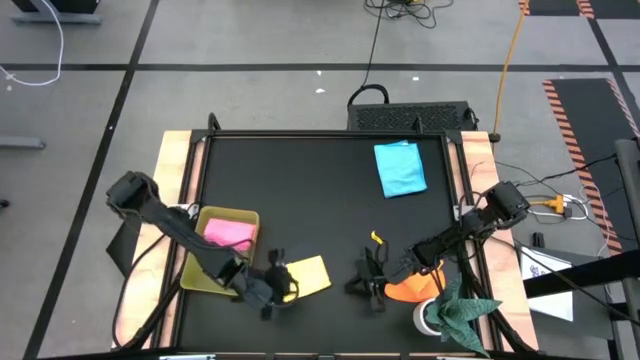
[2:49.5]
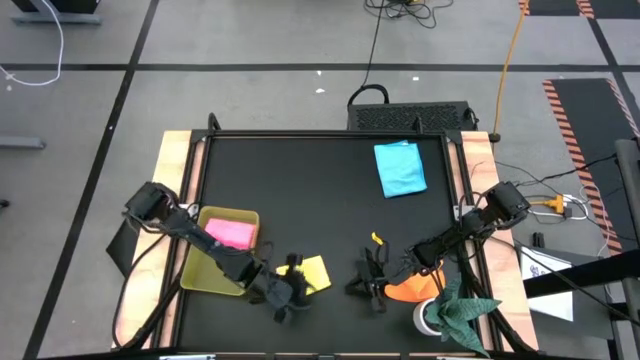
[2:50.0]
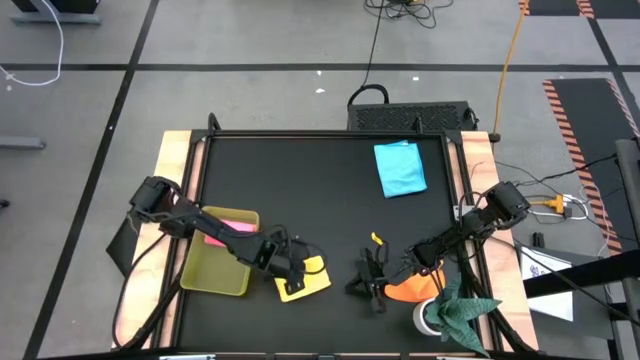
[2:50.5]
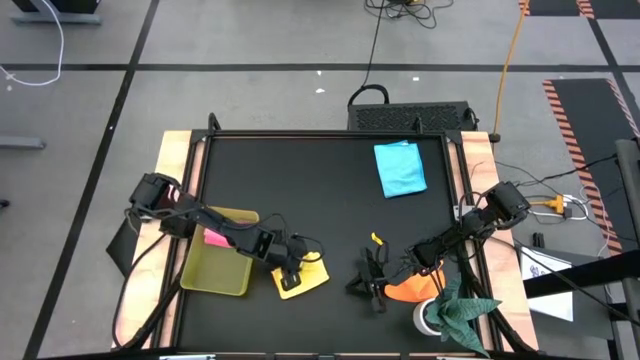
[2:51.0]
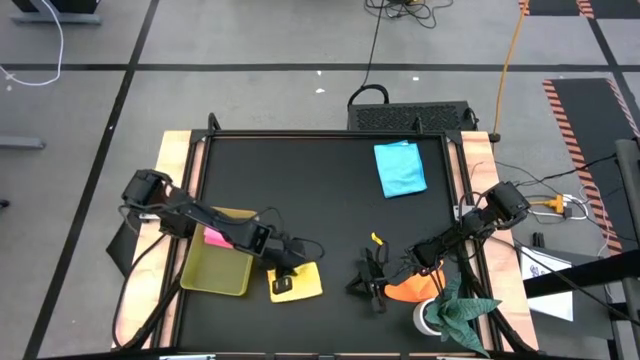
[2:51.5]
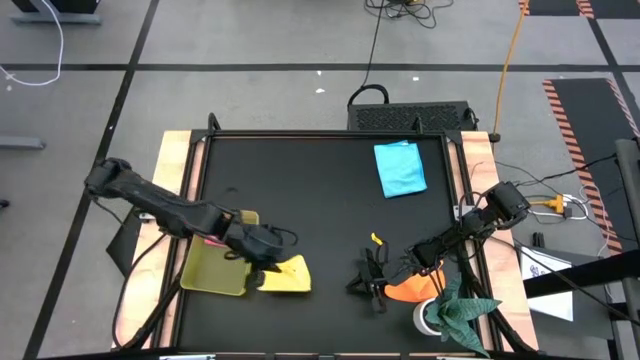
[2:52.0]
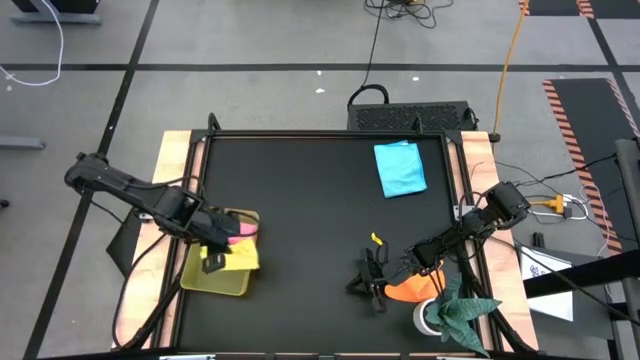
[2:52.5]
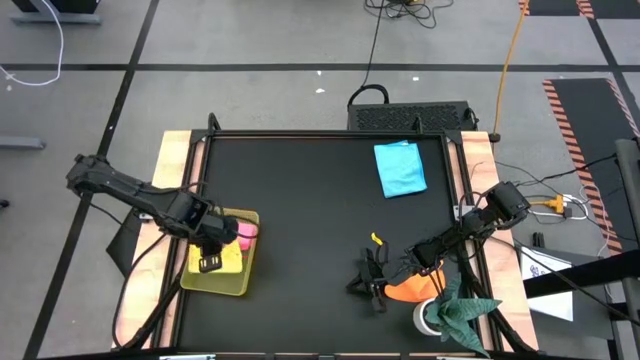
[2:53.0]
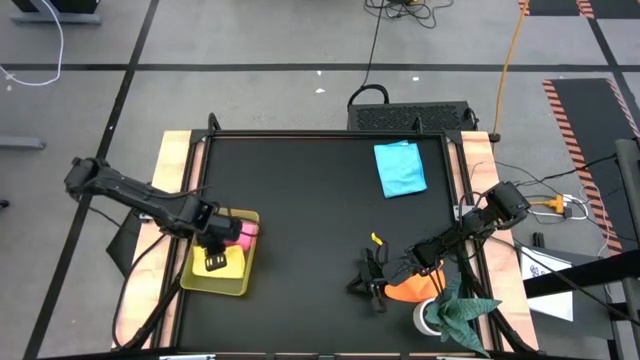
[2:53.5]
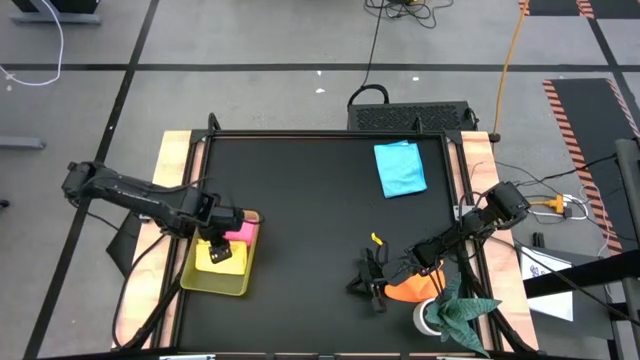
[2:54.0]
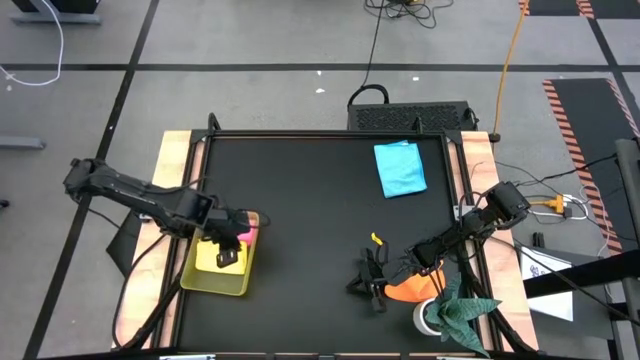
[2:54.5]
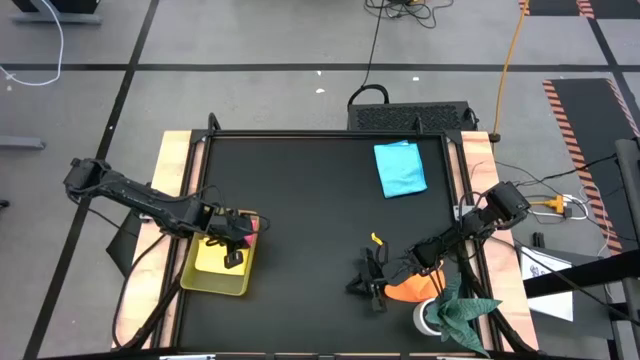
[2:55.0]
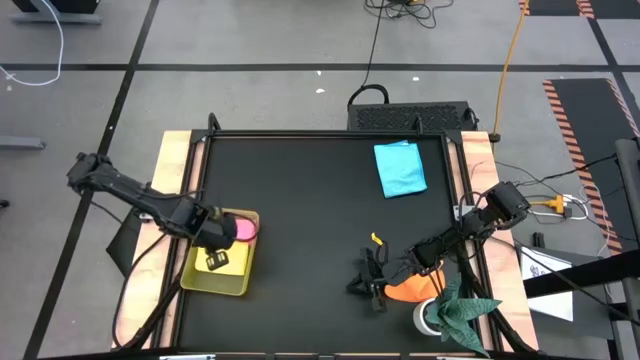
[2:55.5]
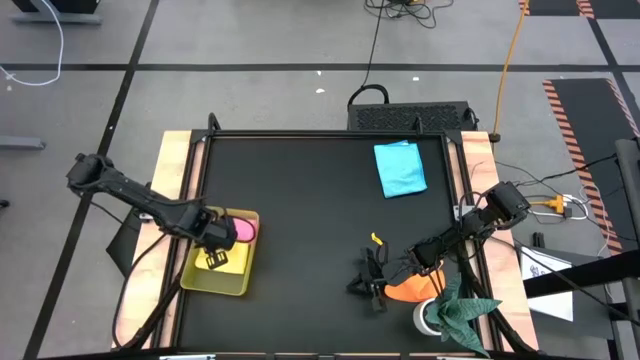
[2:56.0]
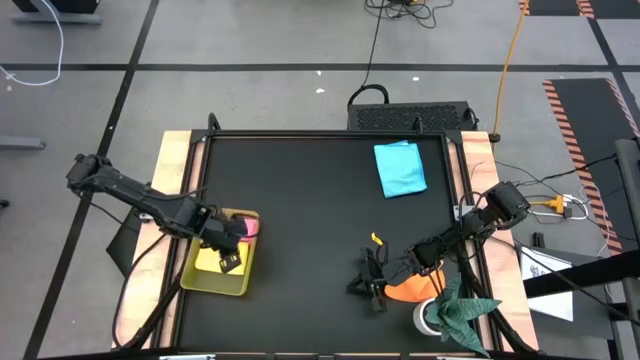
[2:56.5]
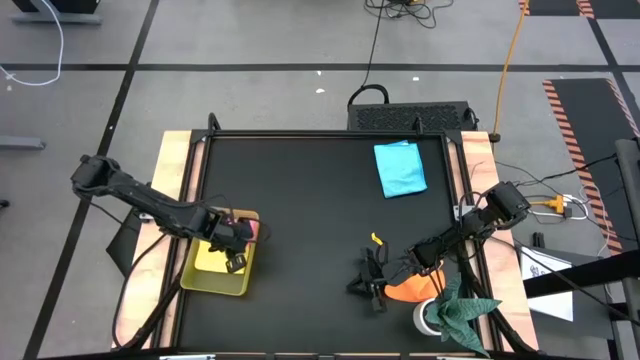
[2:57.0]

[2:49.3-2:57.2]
Task: Fold microfiber towels
Put the yellow microfiber towel into the yellow bin

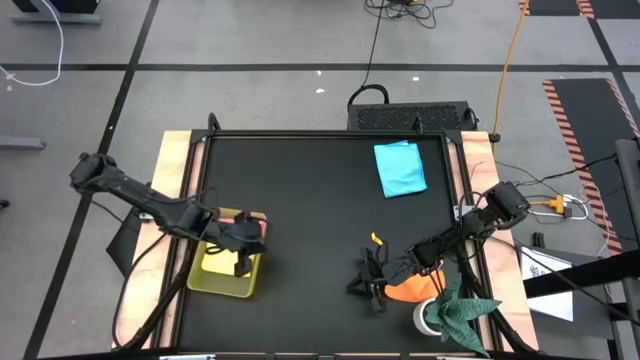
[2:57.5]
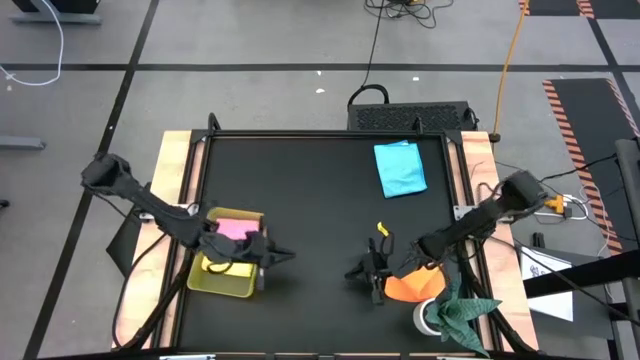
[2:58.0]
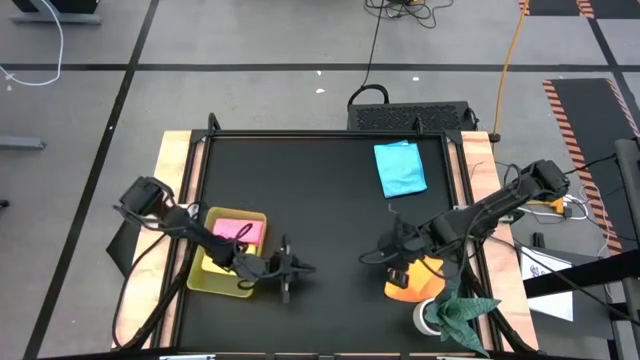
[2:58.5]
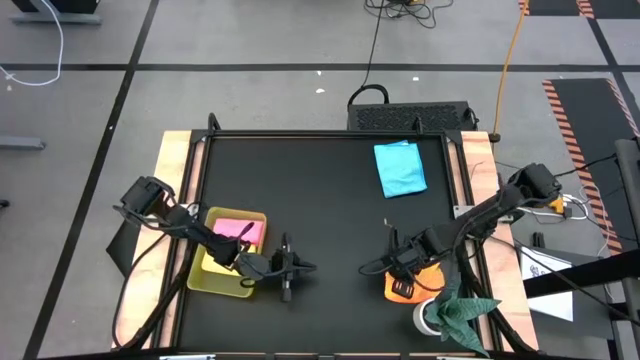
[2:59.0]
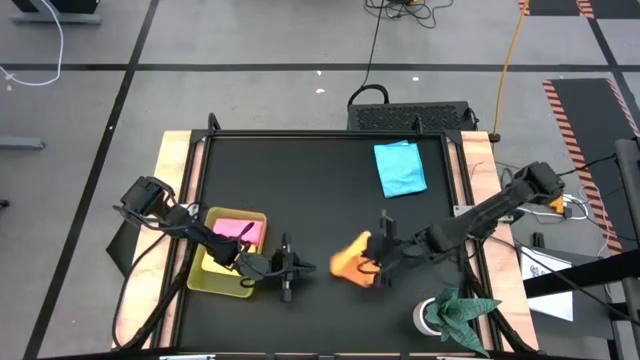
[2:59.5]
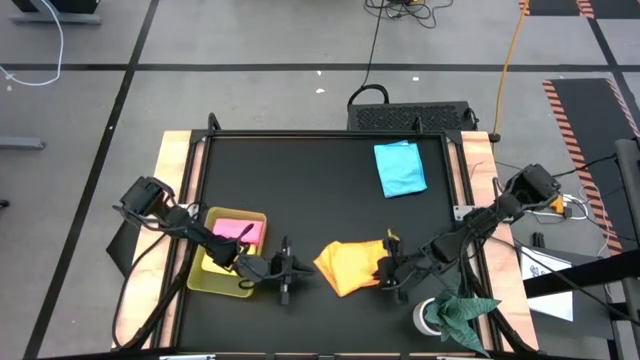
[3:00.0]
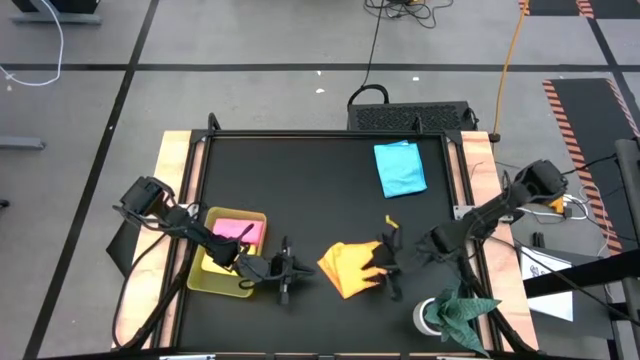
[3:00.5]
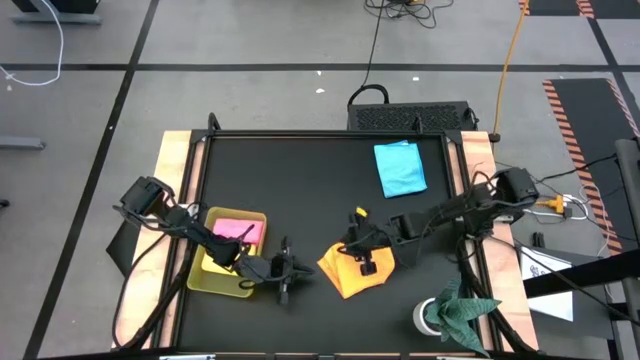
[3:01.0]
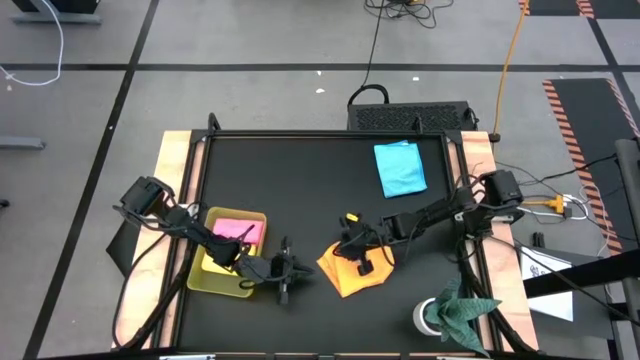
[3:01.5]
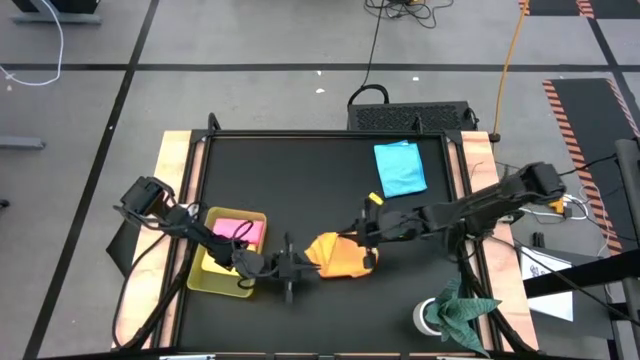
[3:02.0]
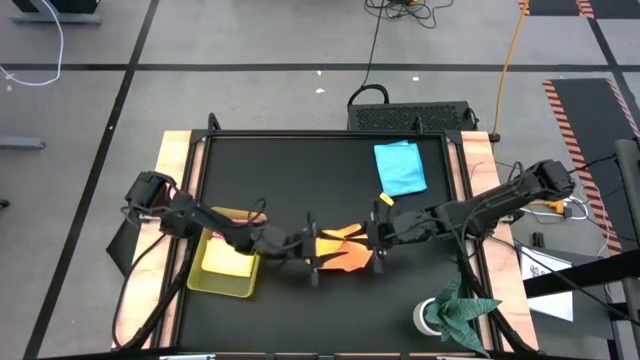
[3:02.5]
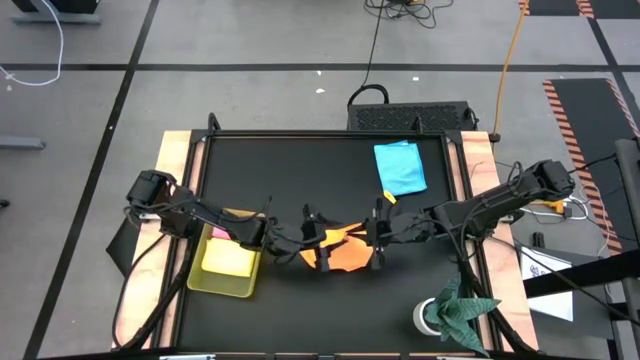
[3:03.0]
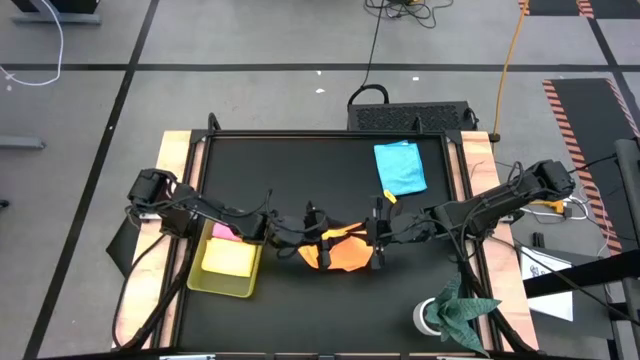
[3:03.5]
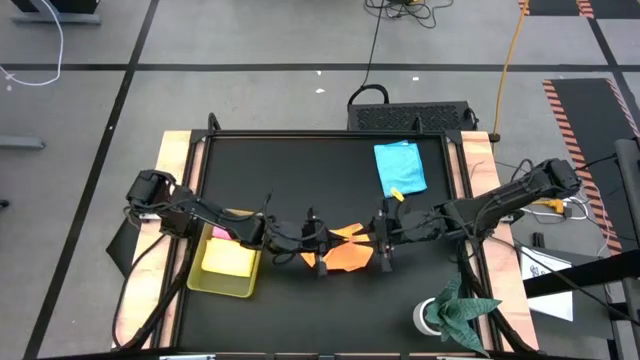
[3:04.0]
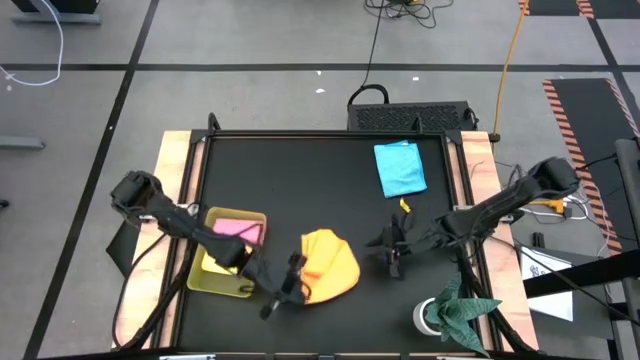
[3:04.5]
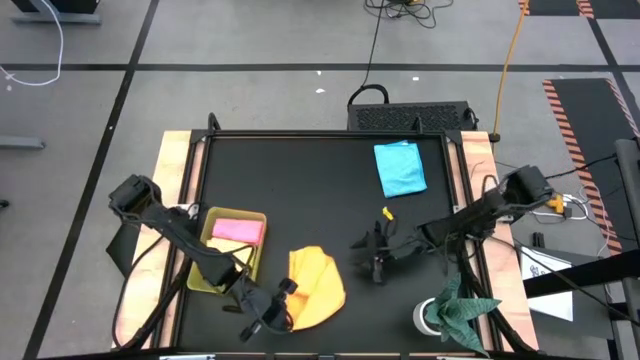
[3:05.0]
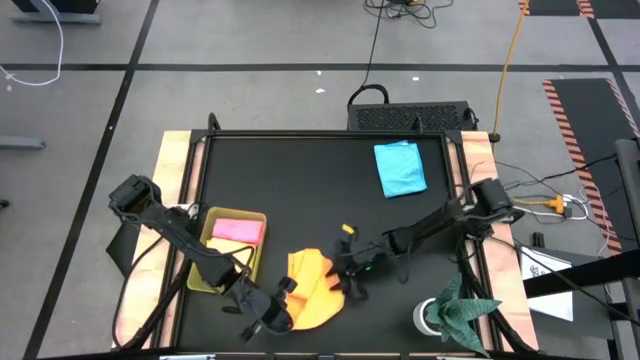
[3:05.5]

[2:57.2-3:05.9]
Fold the orange microfiber towel

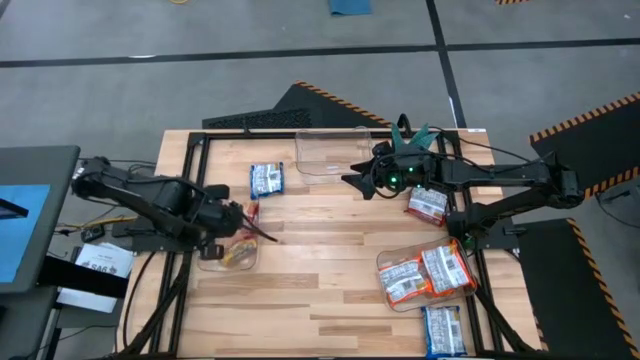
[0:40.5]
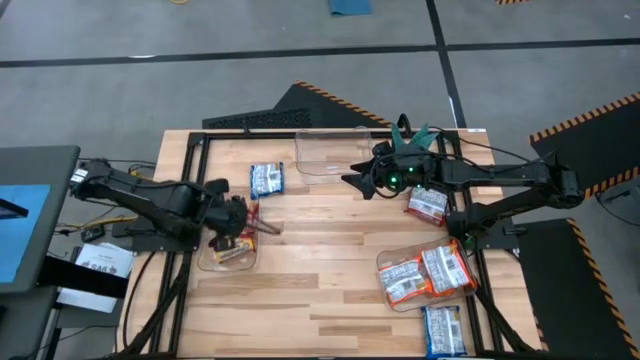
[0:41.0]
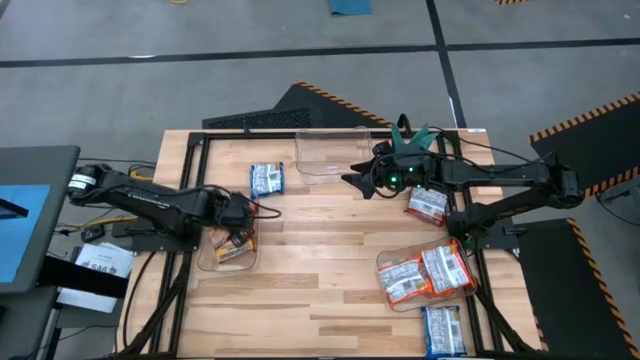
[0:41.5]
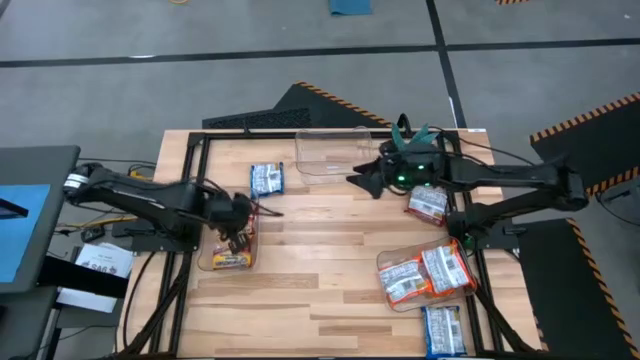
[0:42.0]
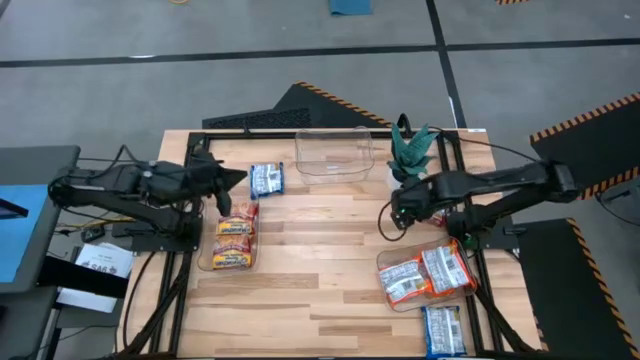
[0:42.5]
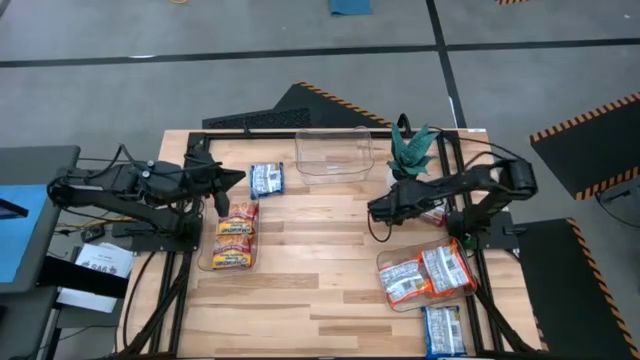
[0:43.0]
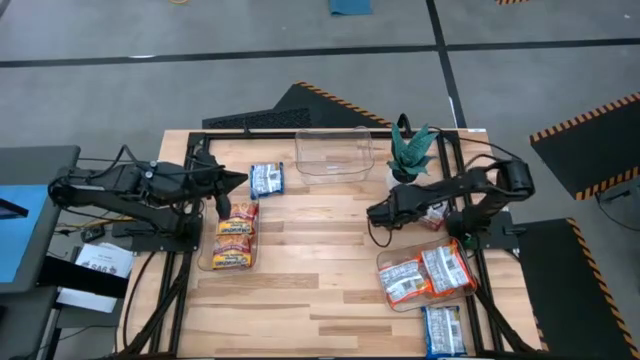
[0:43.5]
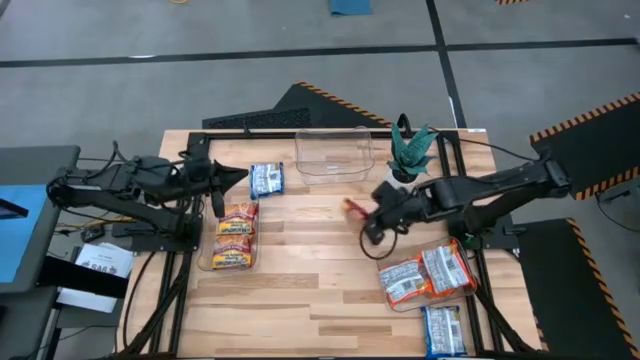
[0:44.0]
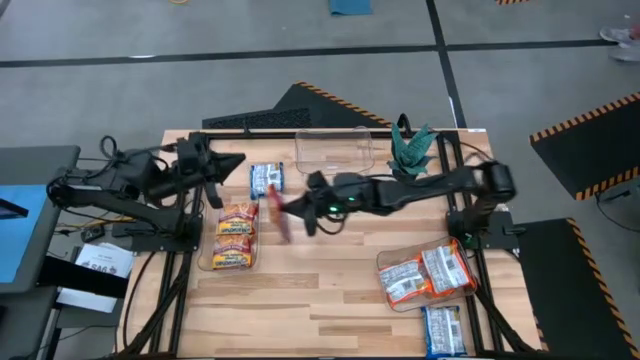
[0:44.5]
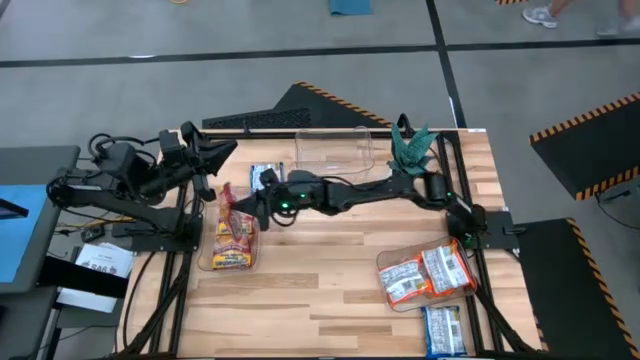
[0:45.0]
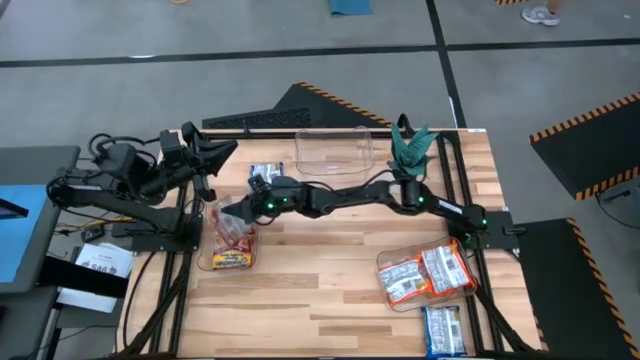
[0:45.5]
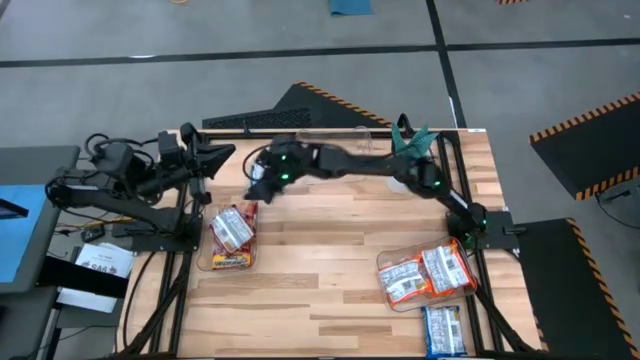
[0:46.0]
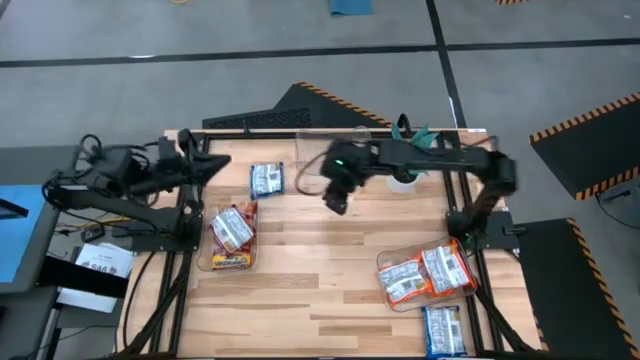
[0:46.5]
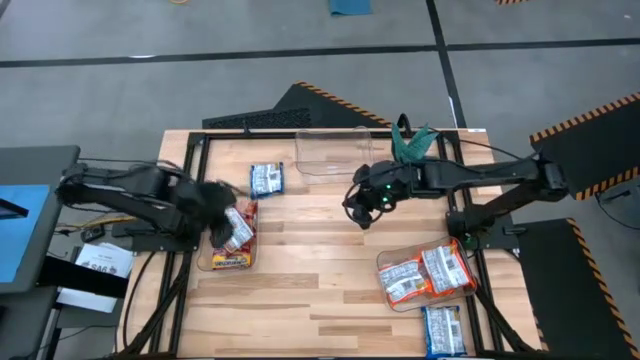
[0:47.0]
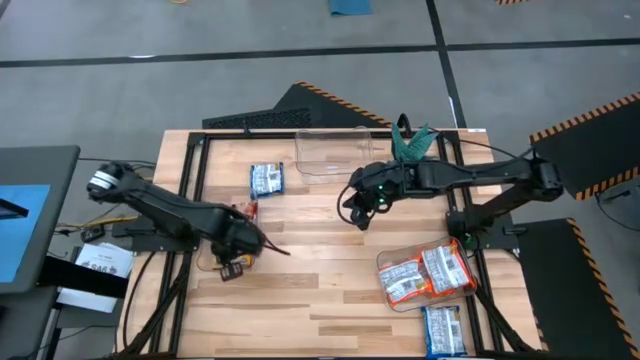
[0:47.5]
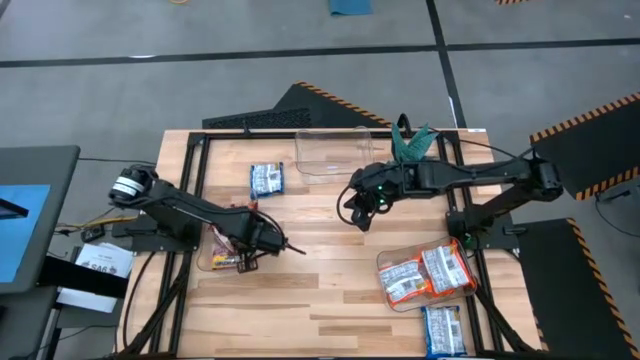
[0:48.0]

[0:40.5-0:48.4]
Task: Sort Maruchan noodles
Put the red noodle pack into the bottom left transparent bin
